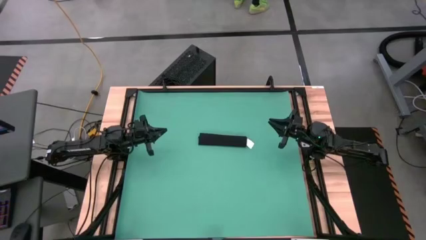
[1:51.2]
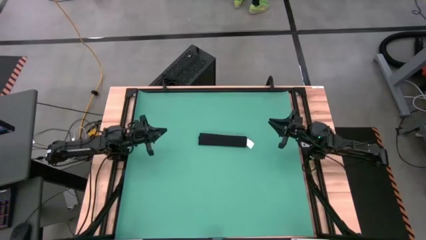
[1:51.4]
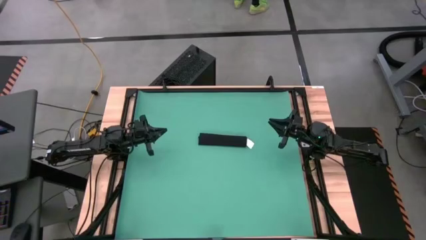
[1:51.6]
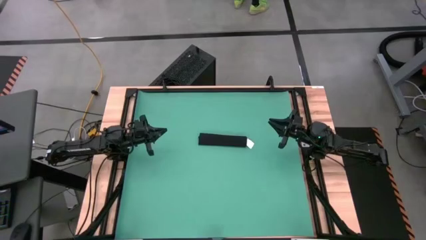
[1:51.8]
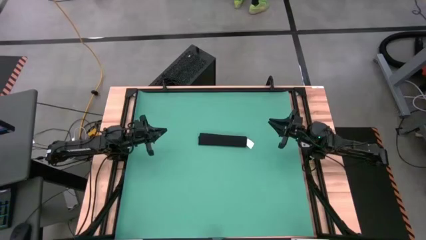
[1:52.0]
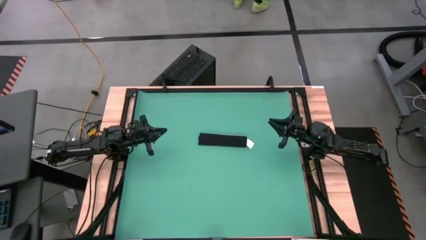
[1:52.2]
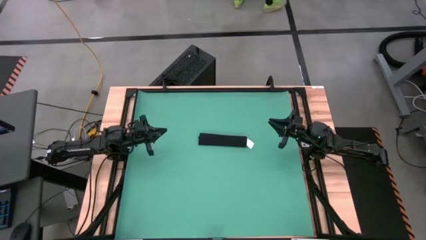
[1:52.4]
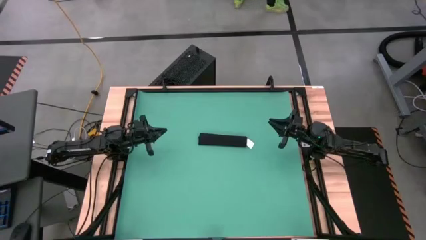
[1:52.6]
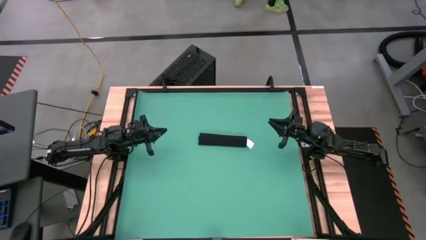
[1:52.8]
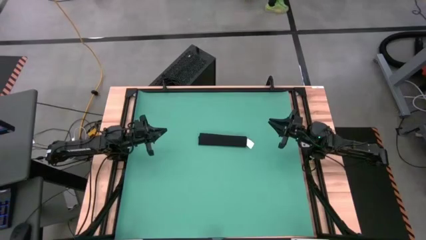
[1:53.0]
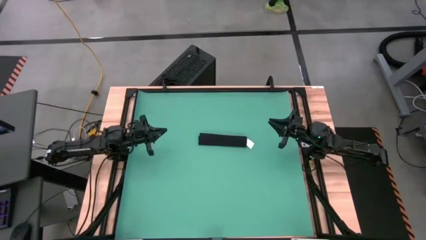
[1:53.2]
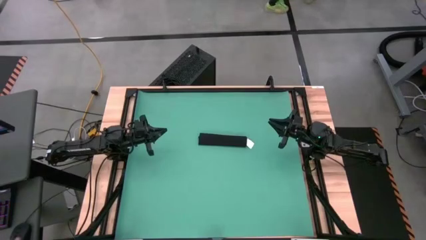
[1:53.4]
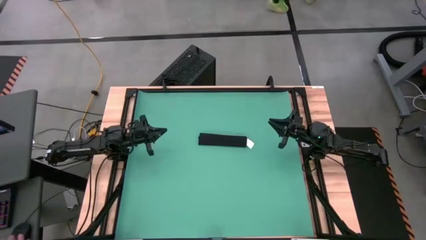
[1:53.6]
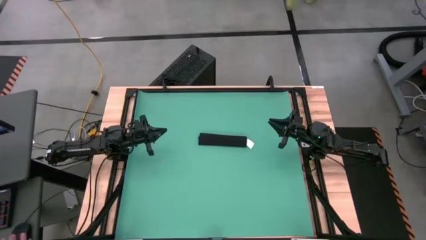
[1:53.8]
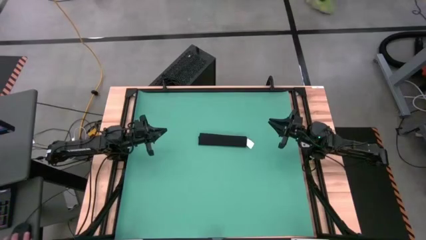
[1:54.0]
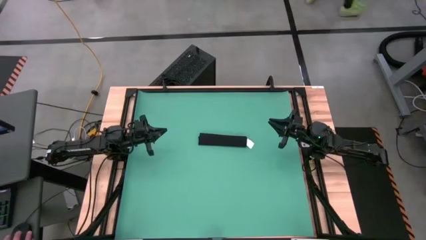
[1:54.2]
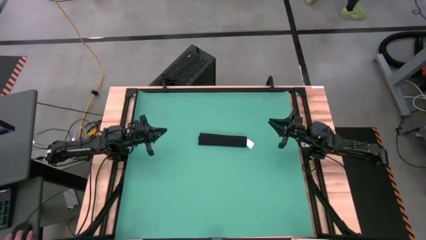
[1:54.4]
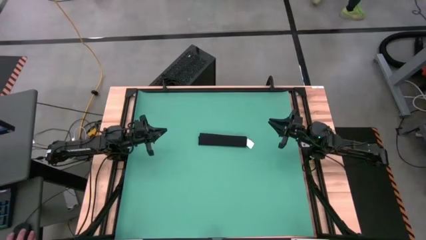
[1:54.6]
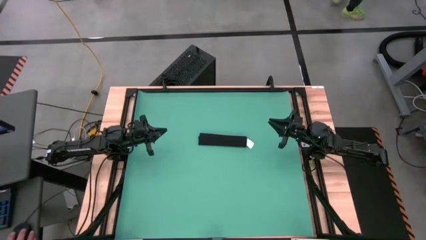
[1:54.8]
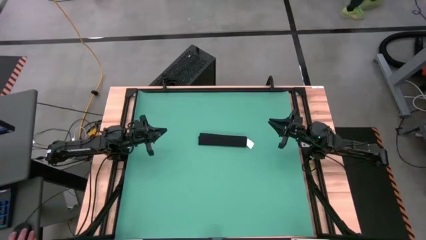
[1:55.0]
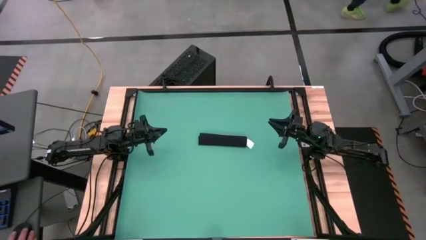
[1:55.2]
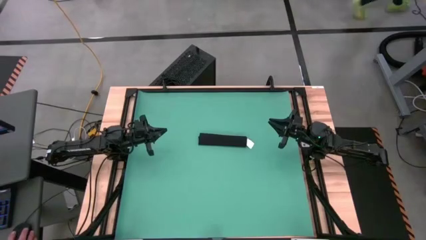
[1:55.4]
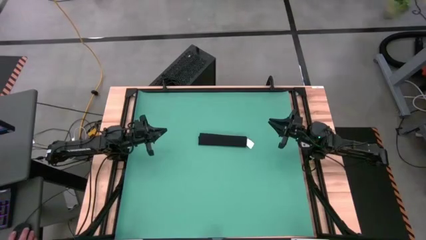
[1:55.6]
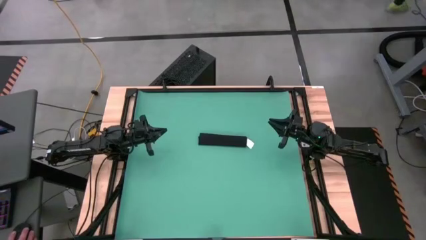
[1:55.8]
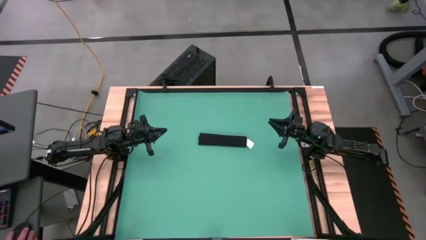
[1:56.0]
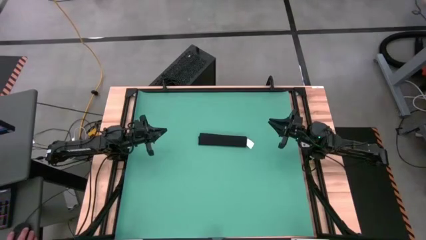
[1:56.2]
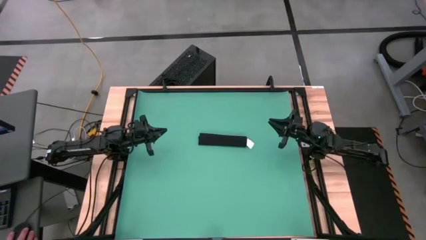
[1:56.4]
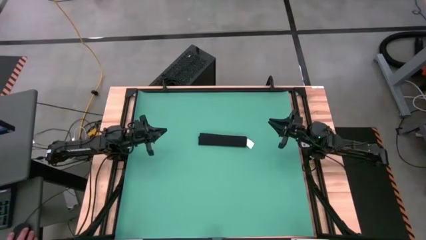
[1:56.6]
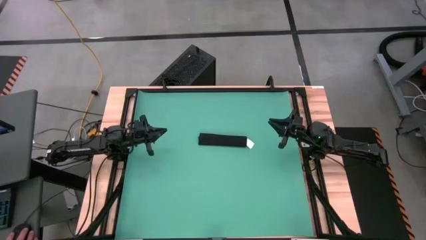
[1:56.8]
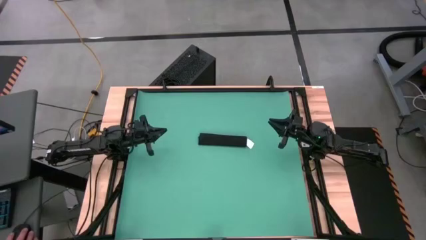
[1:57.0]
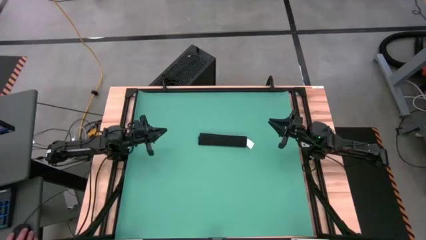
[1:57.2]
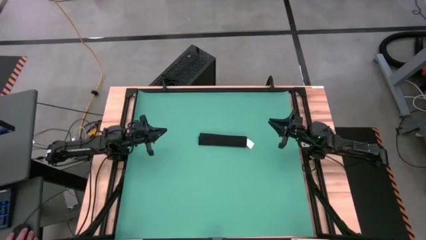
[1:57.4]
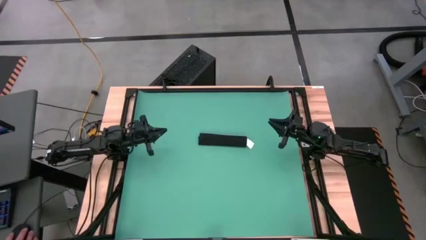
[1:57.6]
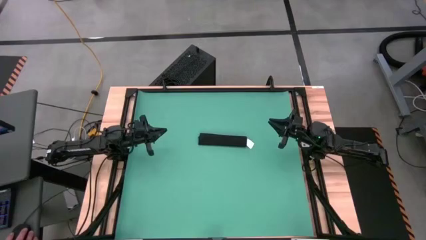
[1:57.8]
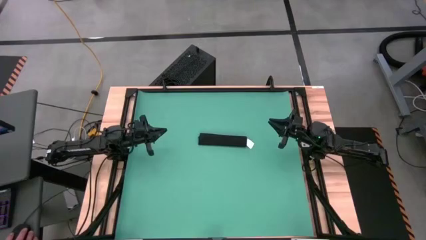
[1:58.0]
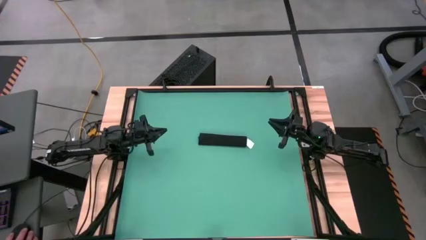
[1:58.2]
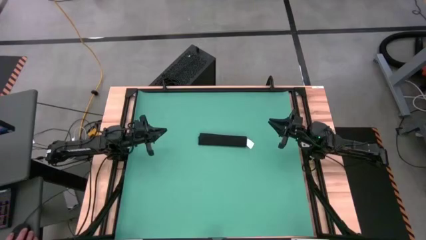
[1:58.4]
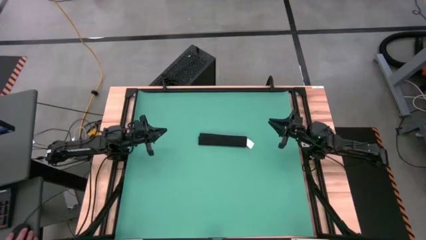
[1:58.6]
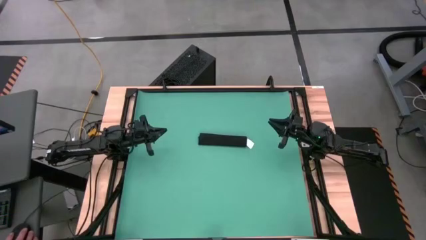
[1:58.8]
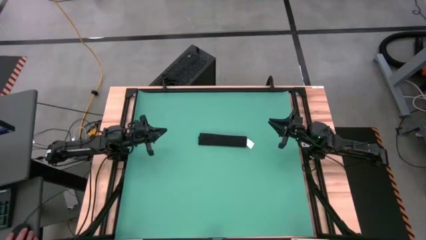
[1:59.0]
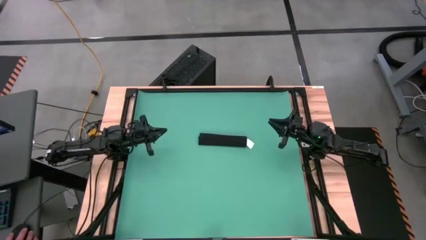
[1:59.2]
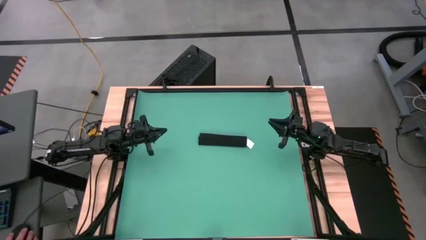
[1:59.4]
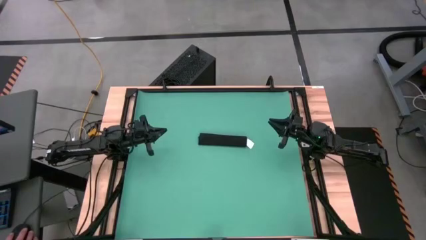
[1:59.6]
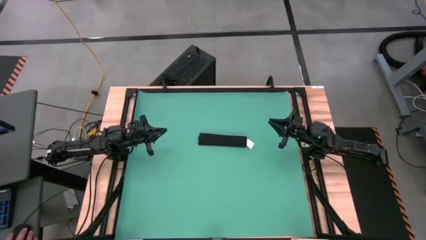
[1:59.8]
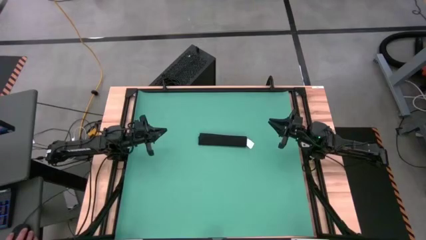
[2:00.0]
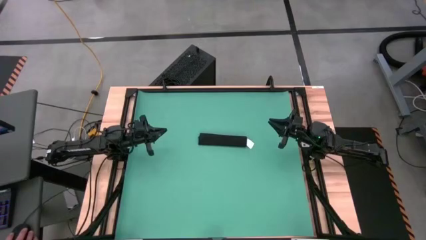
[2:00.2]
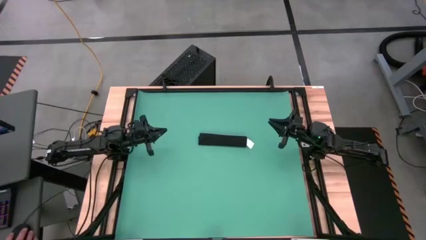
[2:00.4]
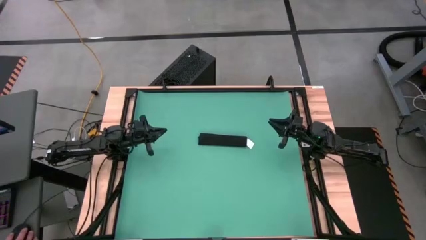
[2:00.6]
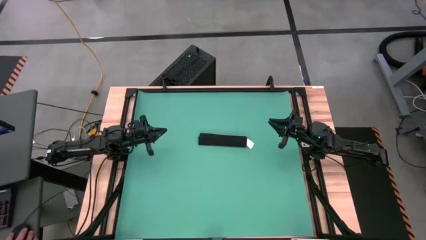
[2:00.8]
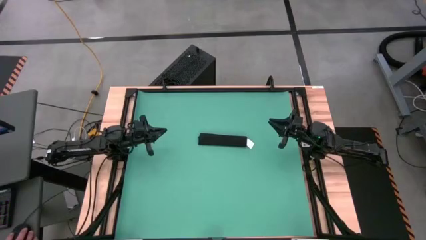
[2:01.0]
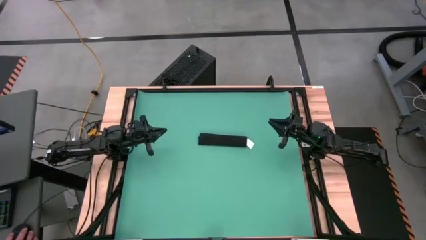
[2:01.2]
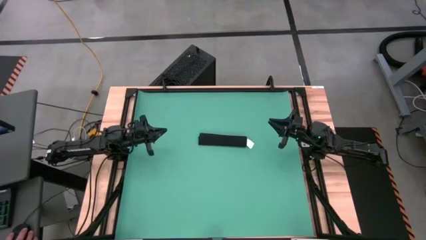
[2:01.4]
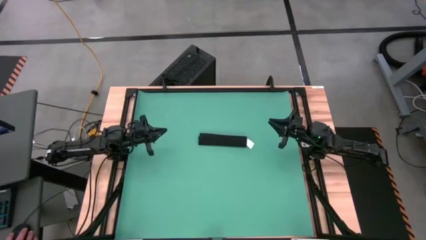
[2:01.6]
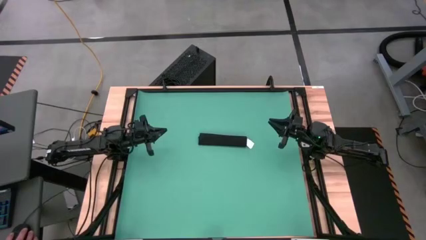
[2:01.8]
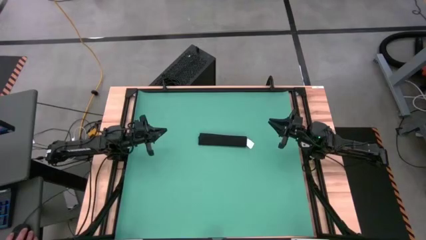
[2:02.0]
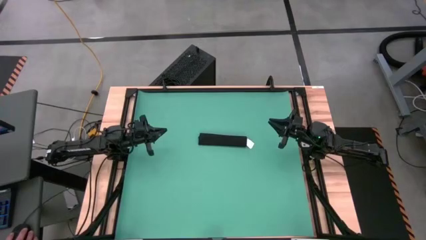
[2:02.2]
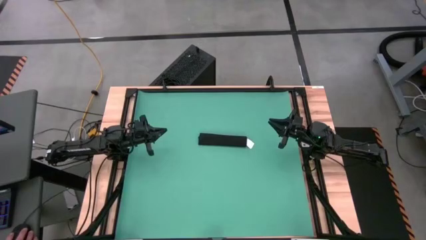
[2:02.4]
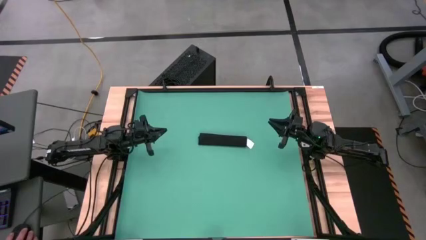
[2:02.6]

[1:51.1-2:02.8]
Task: Roll towel
Return to Home Position

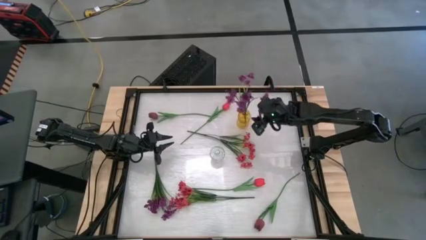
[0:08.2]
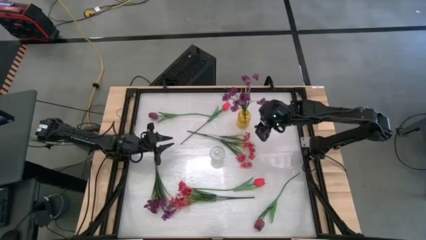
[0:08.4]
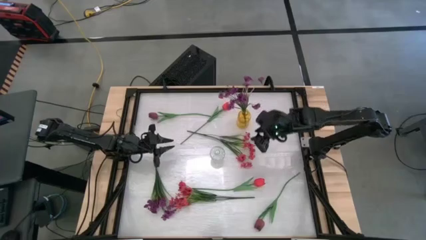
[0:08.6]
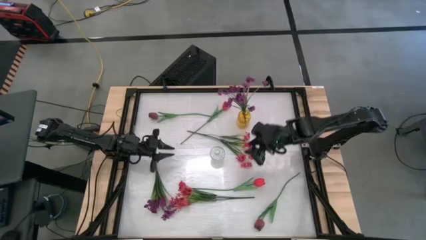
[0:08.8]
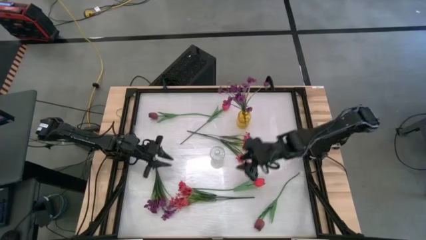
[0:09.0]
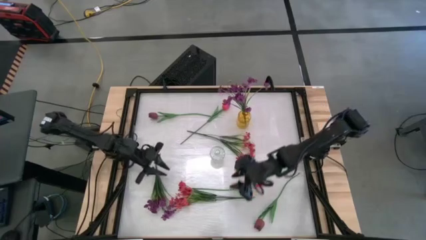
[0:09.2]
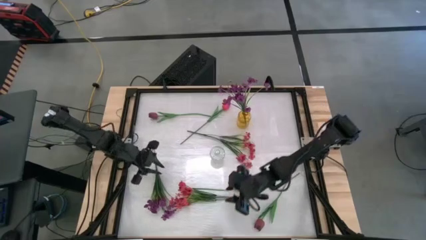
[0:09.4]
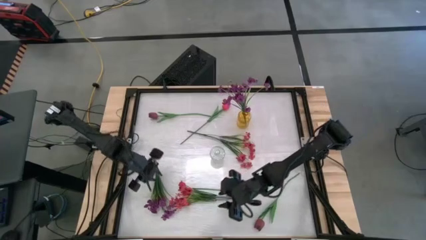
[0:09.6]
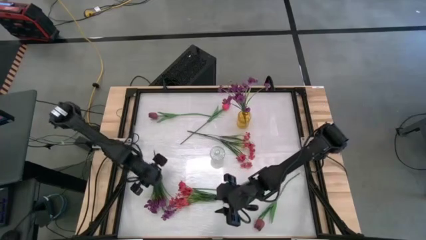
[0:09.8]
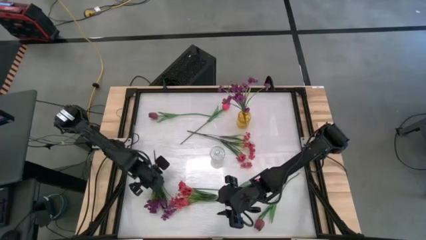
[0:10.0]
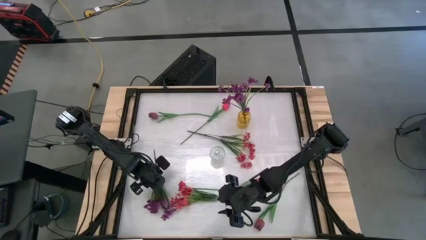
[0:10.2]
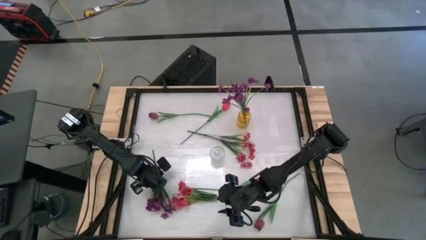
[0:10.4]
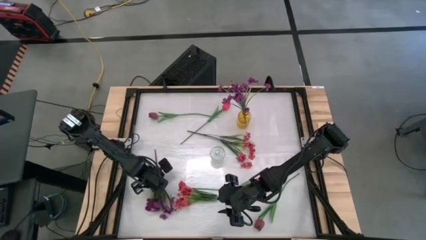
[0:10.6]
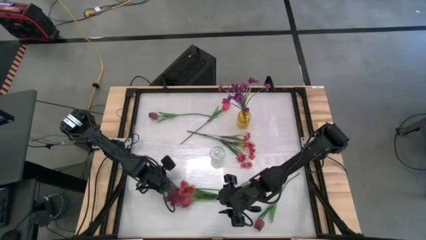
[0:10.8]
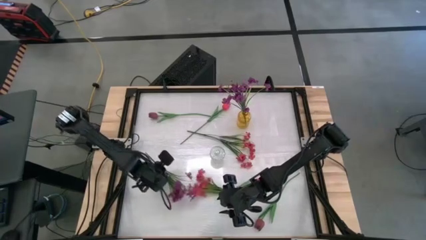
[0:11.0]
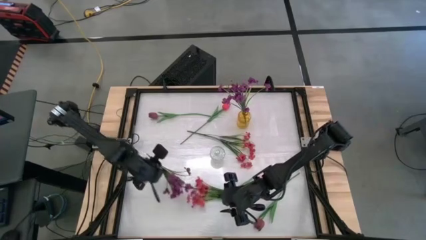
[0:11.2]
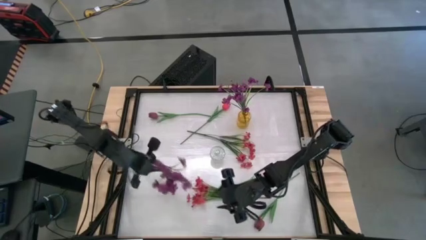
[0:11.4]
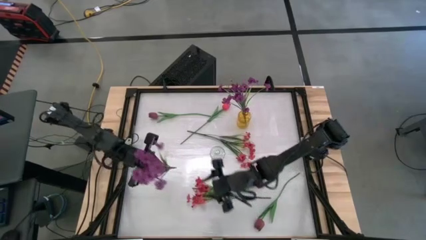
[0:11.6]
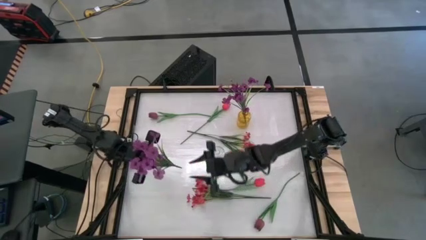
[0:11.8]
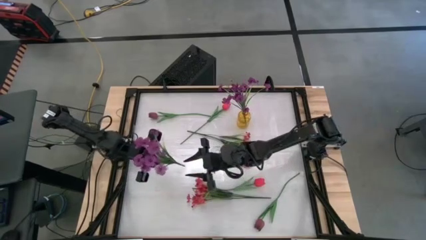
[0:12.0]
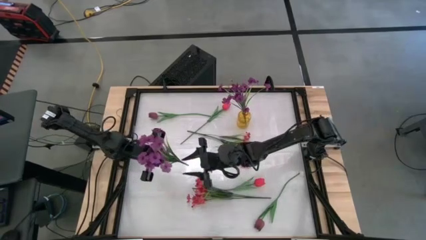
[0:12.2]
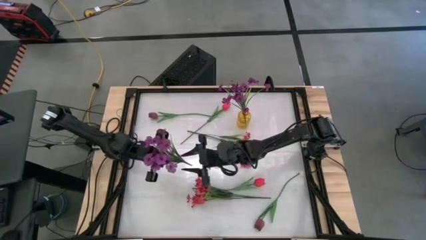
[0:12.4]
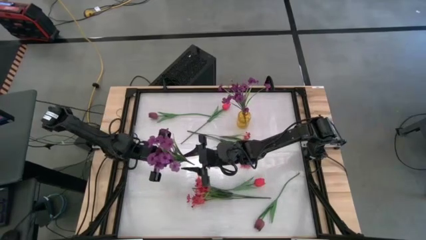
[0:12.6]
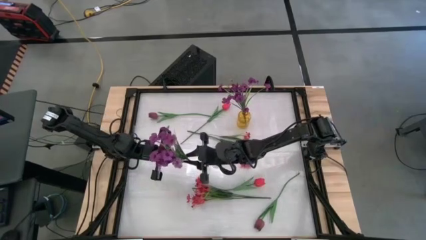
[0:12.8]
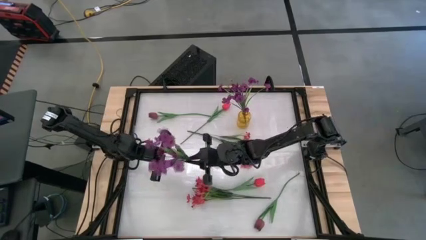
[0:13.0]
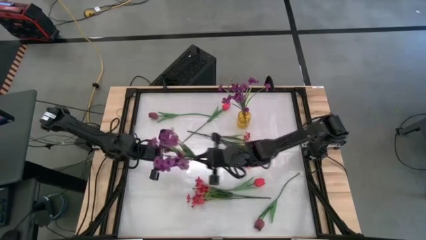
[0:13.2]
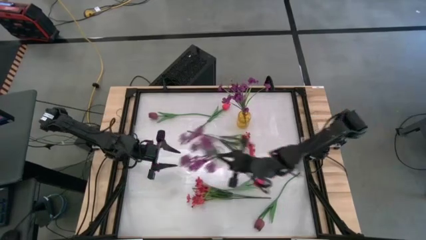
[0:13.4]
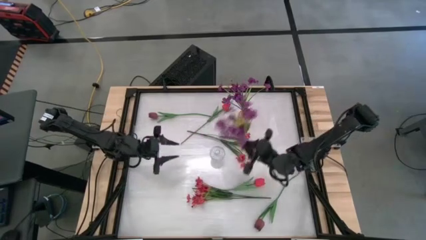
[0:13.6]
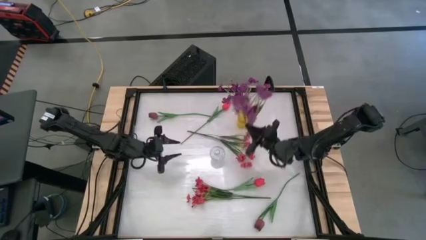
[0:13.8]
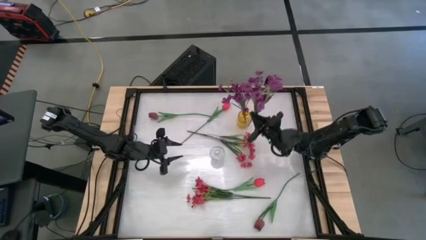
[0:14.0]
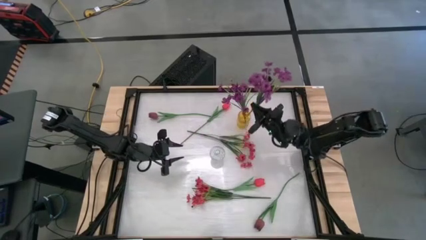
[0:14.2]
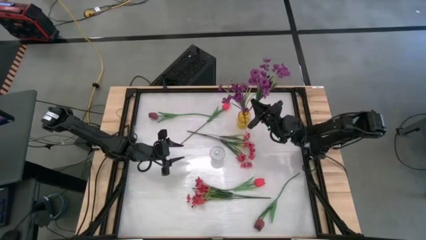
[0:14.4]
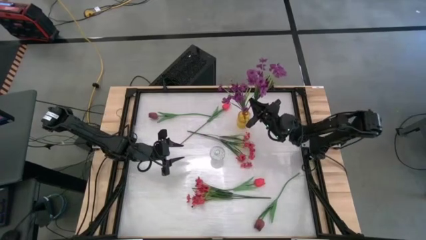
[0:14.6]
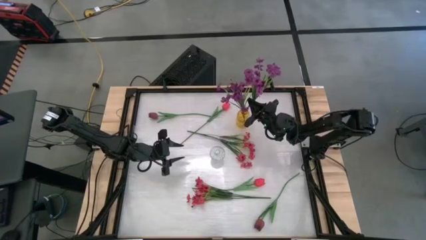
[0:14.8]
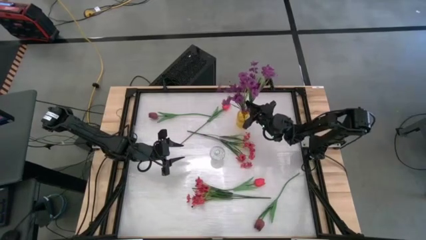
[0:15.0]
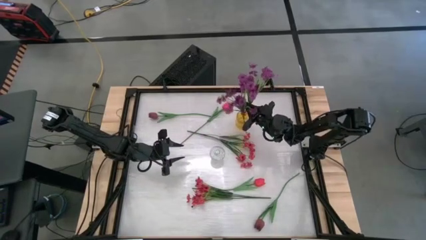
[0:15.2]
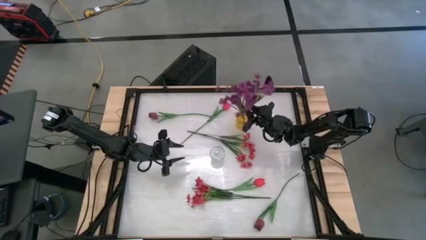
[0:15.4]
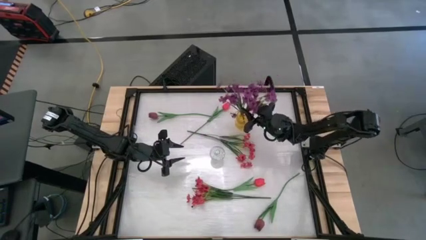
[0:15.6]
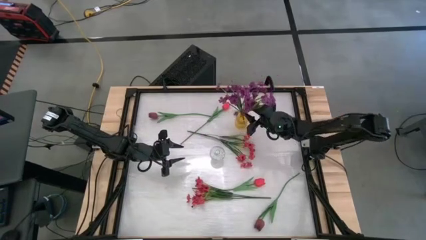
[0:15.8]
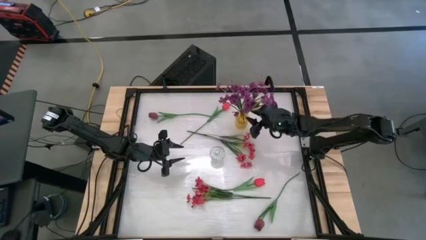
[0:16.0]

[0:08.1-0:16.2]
Task: Sort flowers into vase by color
Put the purple flower into the yellow vase
